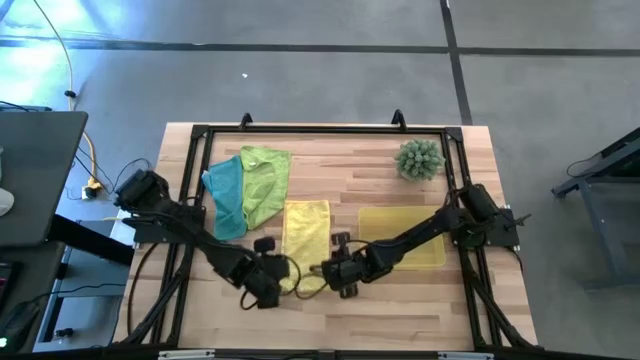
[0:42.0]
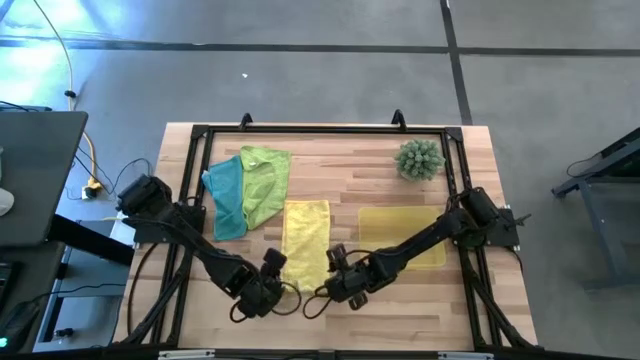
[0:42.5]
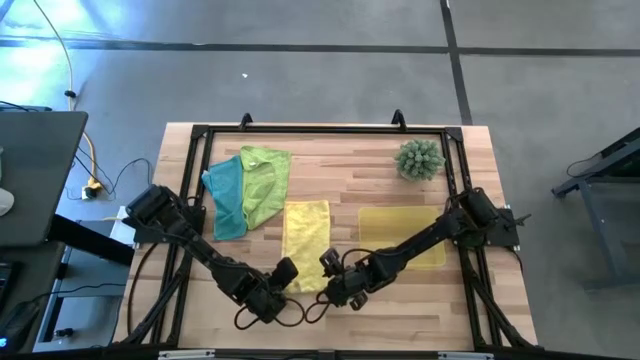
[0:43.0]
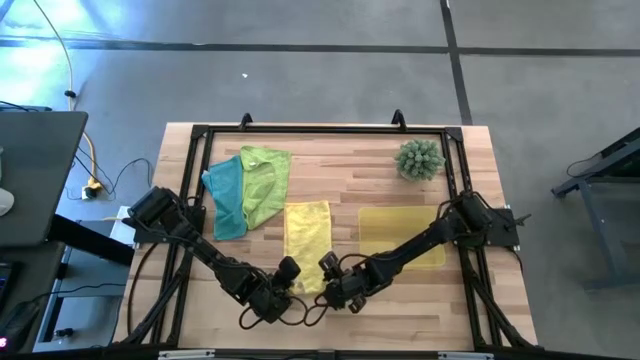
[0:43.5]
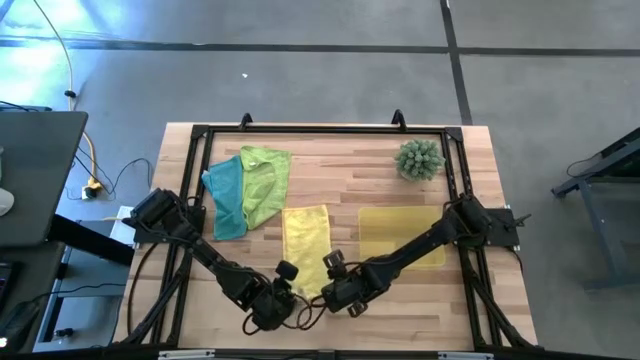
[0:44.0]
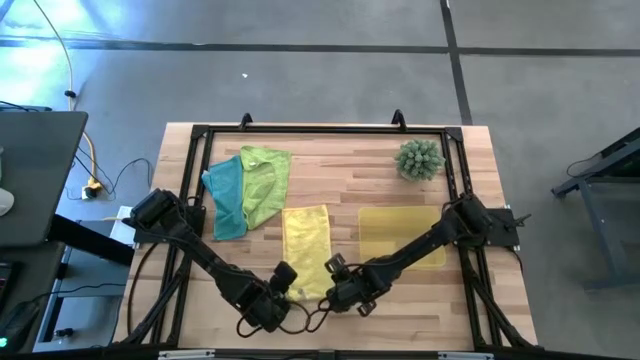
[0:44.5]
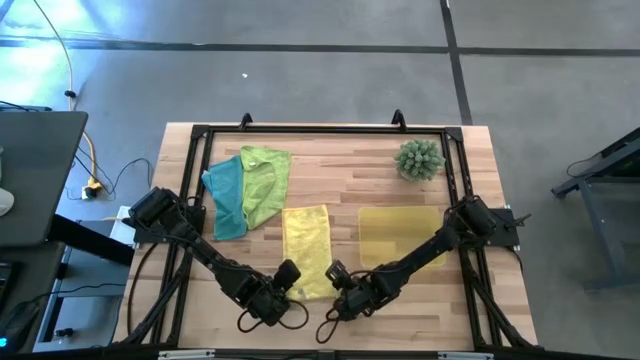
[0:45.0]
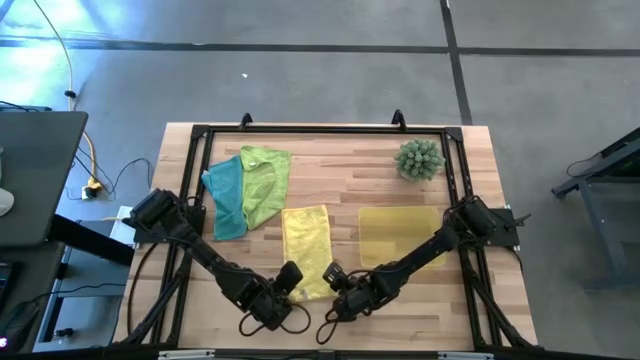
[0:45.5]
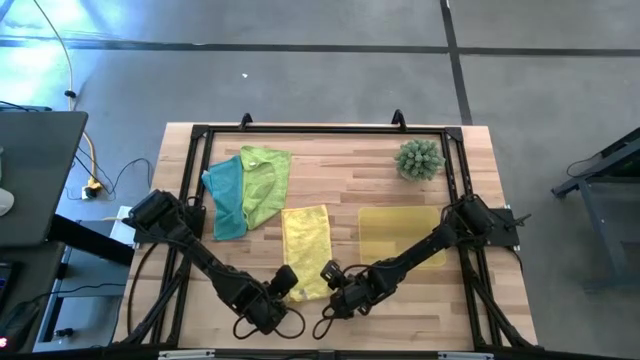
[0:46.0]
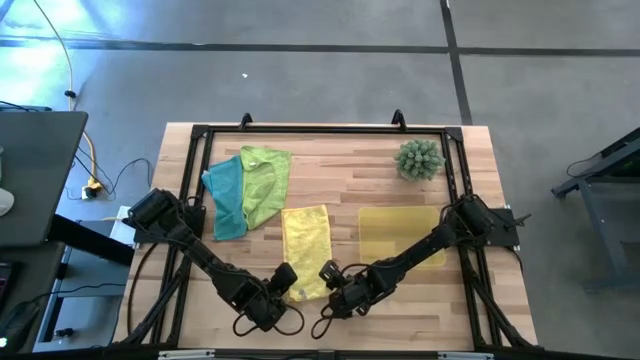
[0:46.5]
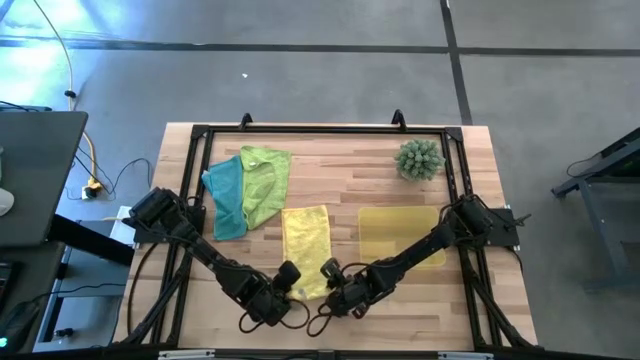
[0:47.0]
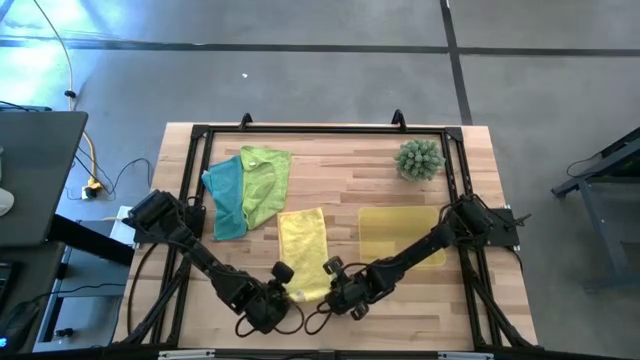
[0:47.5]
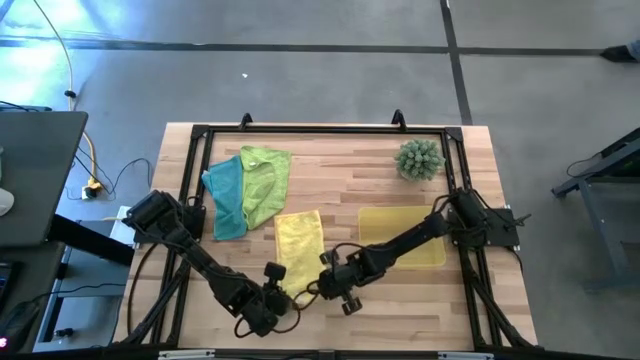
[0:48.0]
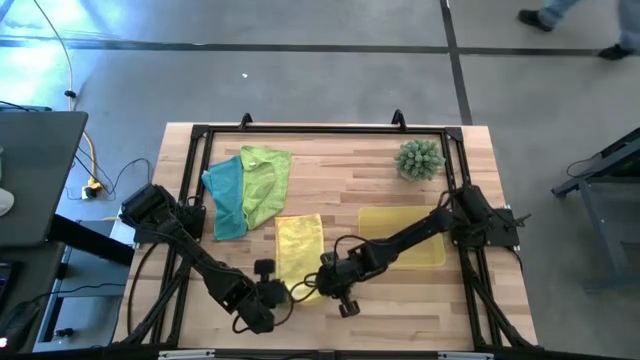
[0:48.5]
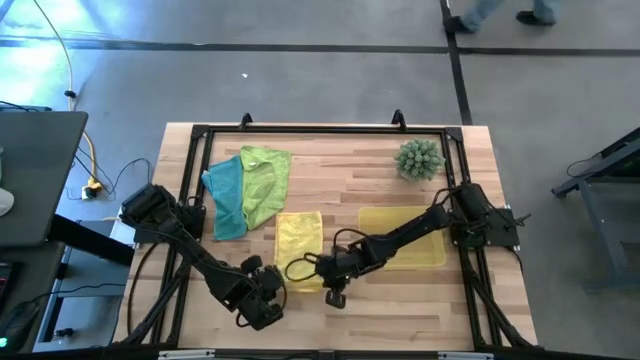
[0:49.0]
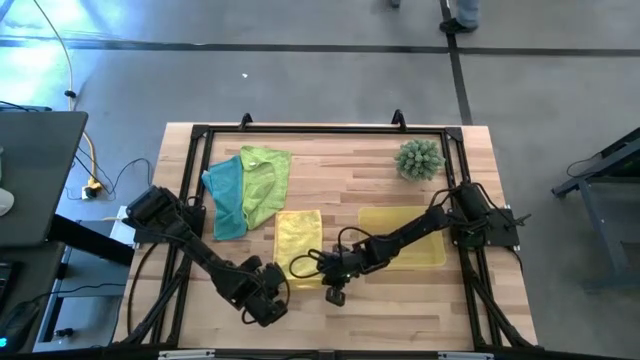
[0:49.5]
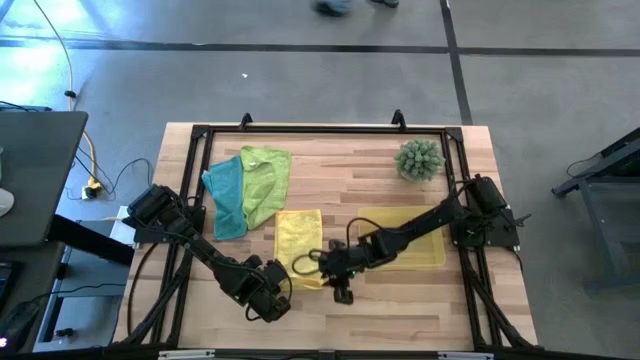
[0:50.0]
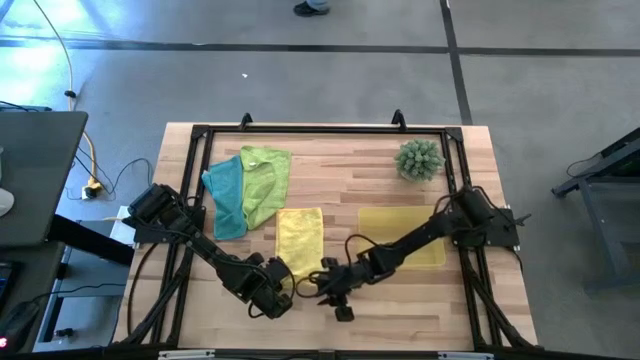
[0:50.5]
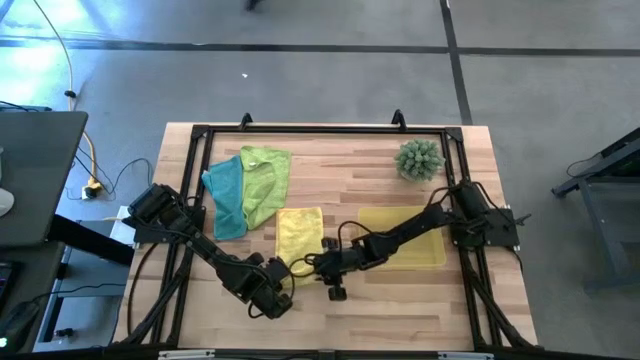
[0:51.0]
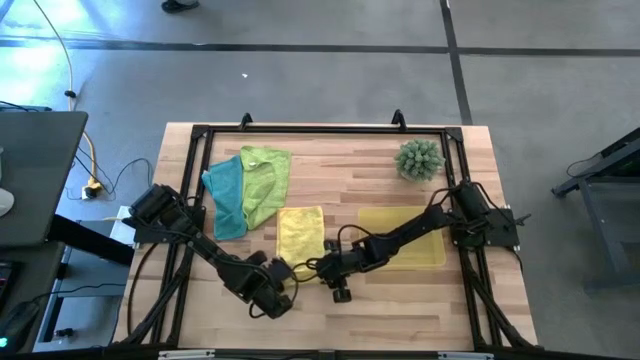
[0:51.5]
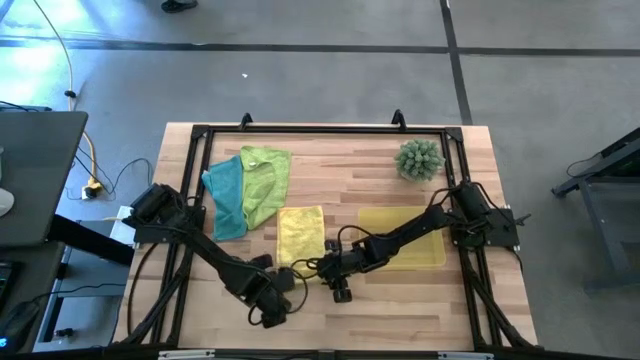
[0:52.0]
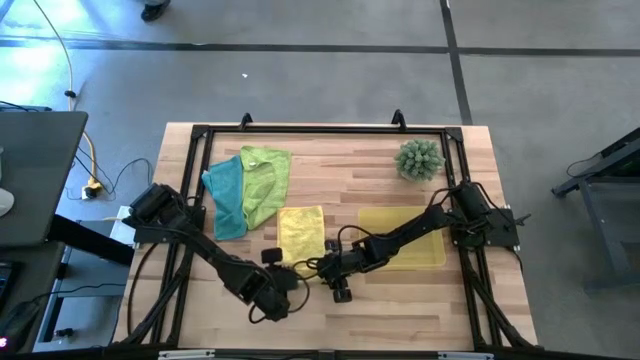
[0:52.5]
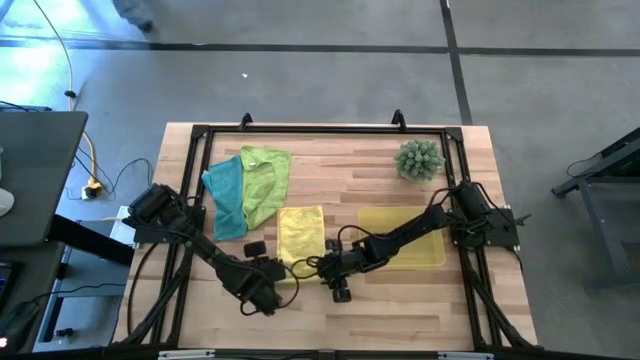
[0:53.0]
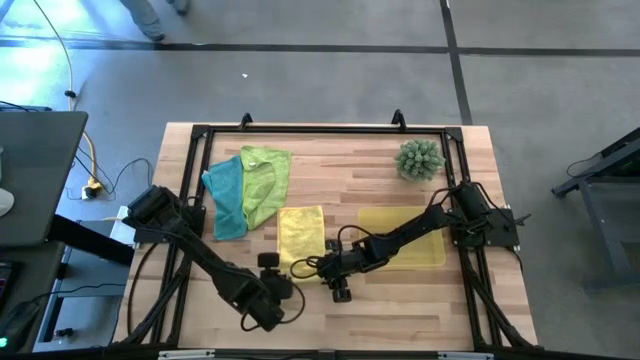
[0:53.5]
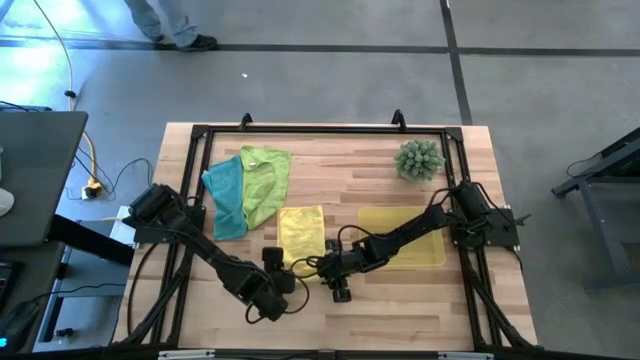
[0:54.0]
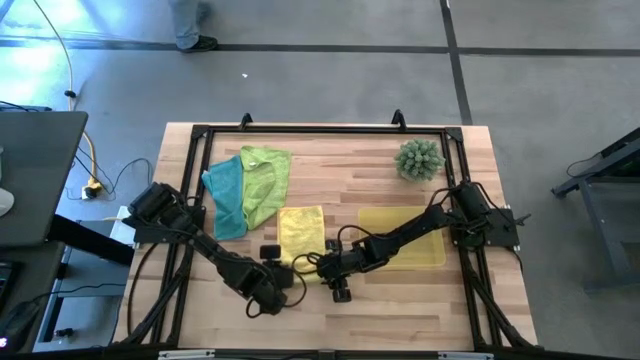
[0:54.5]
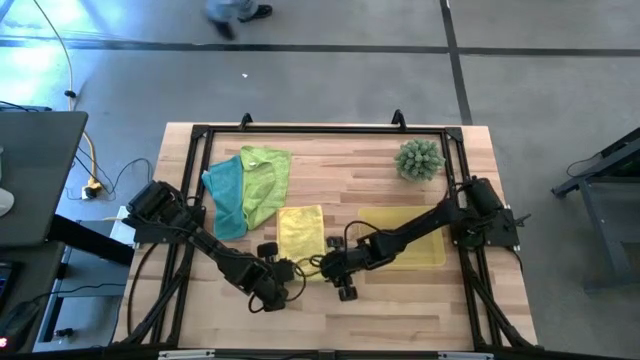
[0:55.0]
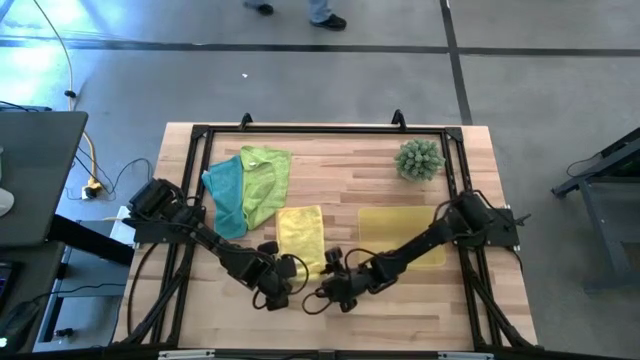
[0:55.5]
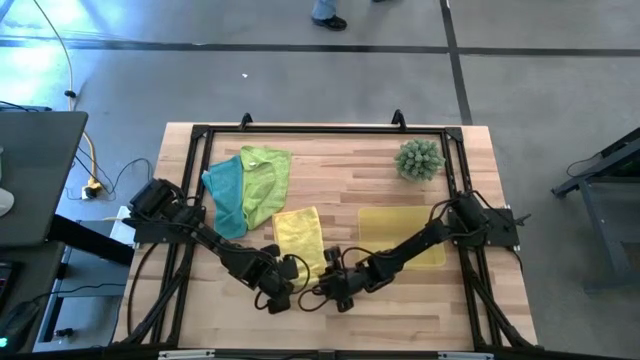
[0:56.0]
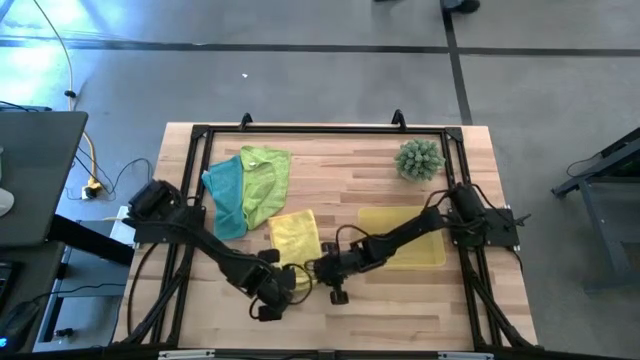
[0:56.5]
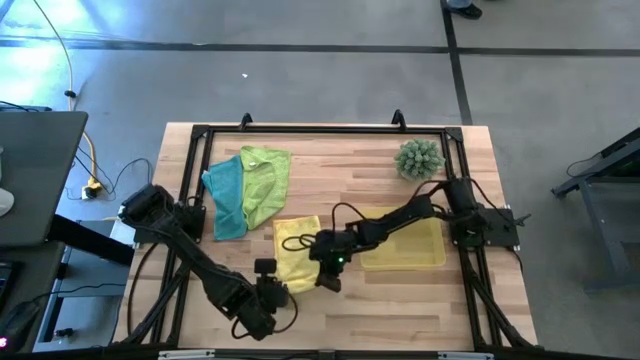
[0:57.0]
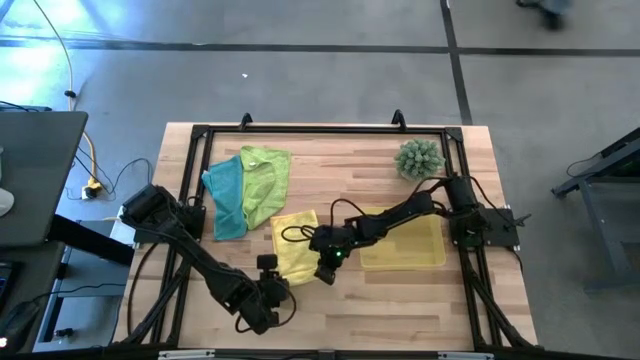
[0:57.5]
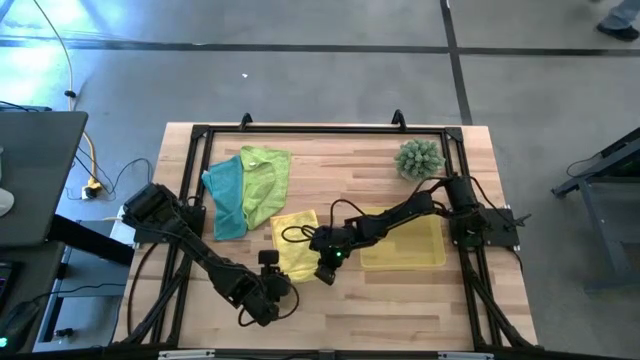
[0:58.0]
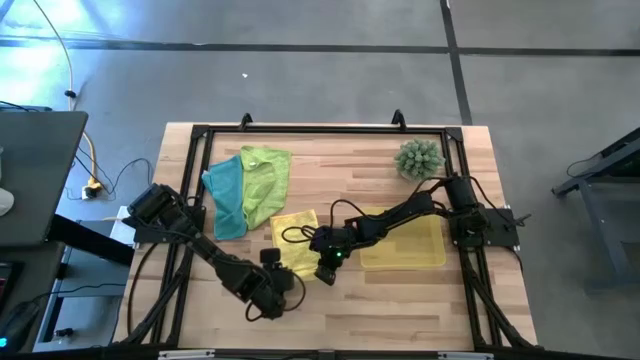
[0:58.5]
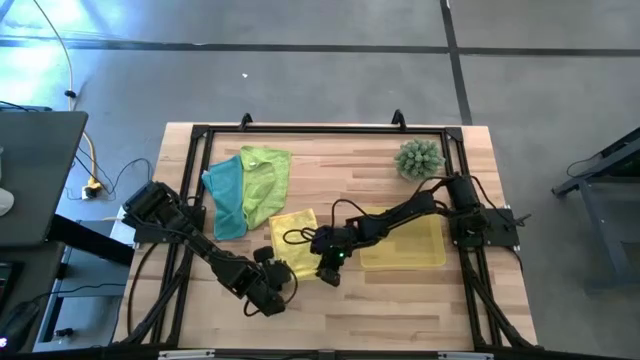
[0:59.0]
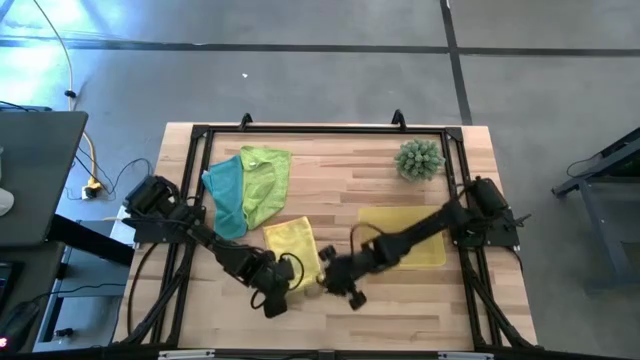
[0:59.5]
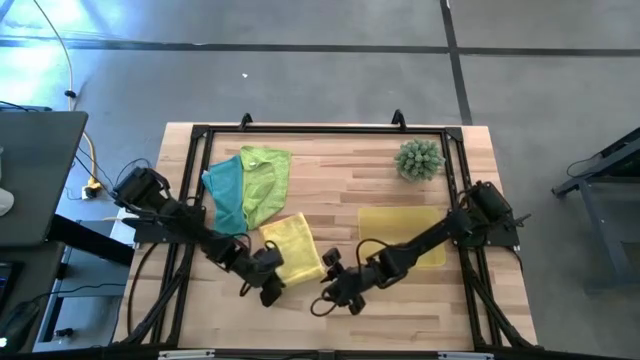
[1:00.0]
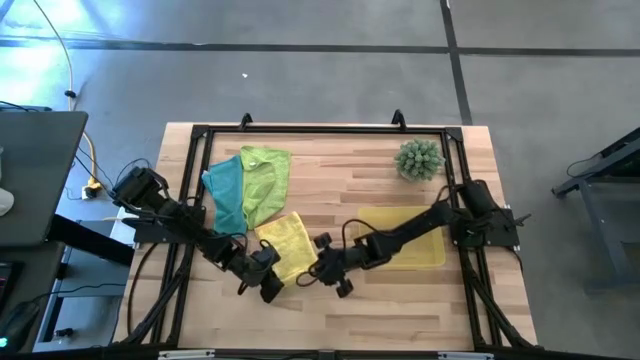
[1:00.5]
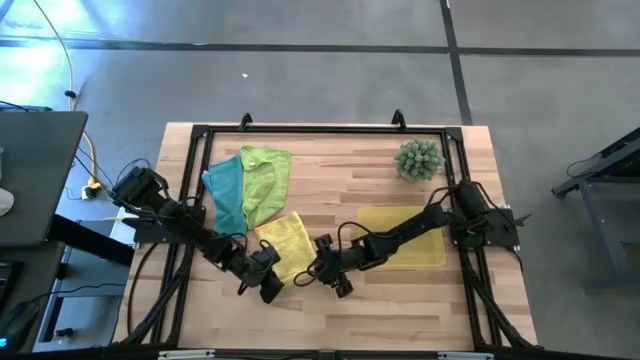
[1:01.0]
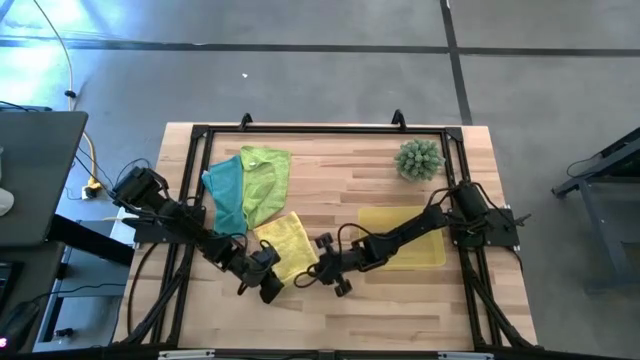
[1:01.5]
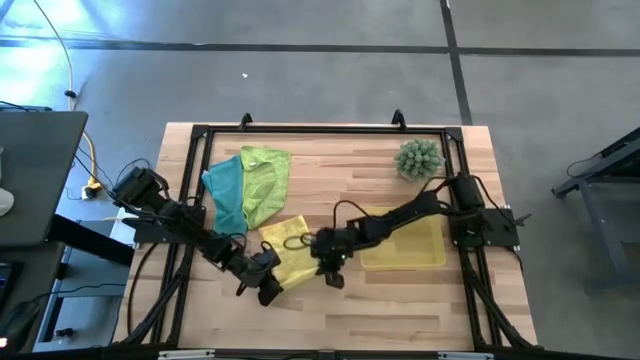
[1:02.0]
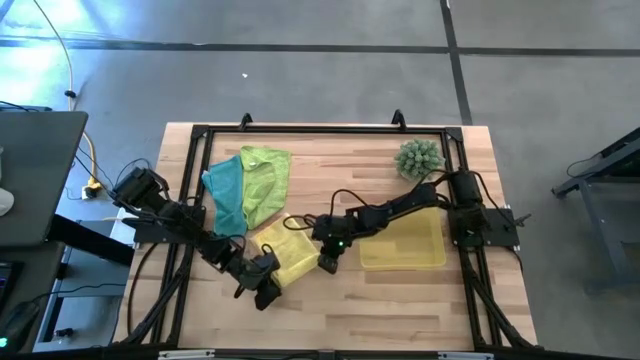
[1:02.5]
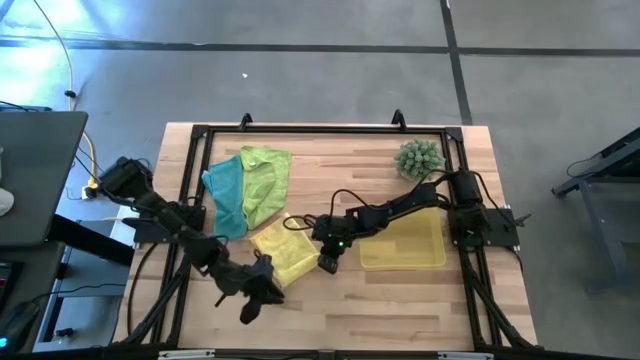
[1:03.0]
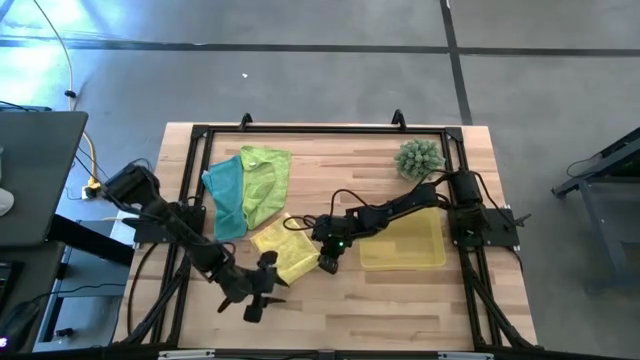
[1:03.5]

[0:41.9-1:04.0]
Task: Roll microfiber towels into tight, uniform cylinder then place into a basket
Roll the yellow microfiber towel
